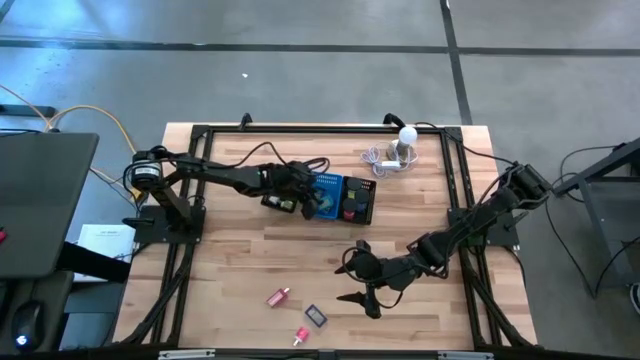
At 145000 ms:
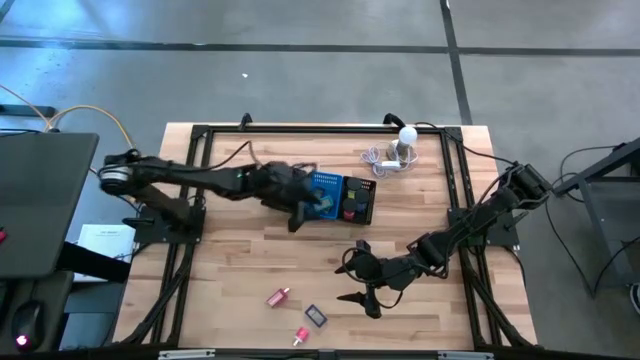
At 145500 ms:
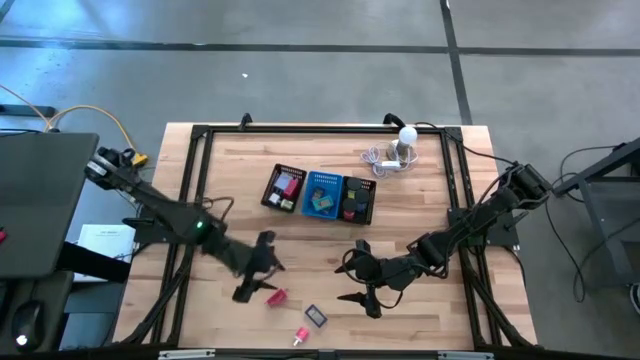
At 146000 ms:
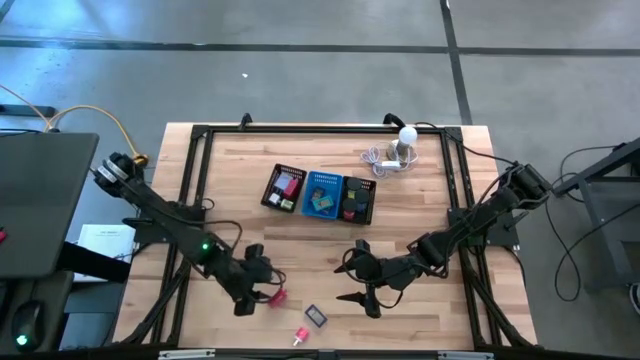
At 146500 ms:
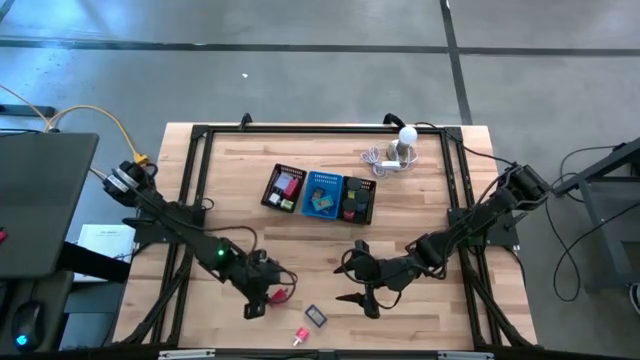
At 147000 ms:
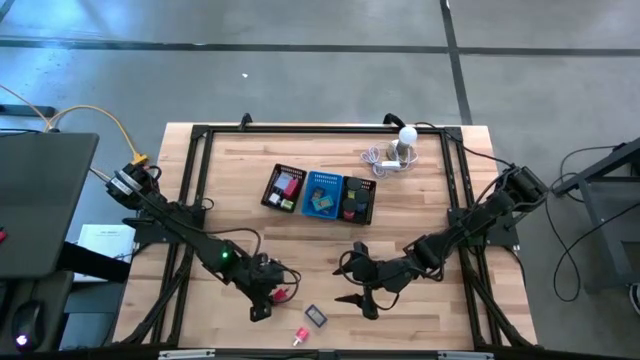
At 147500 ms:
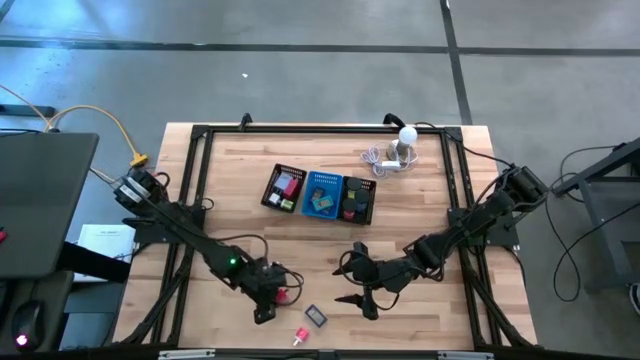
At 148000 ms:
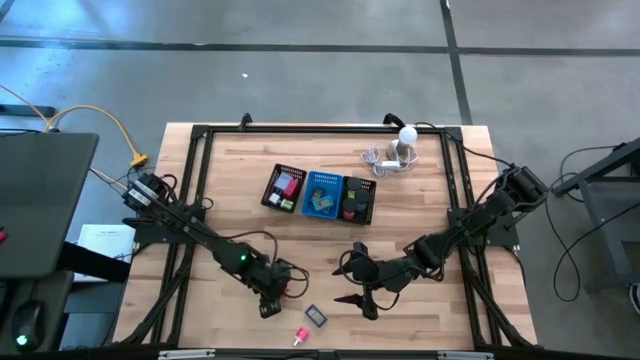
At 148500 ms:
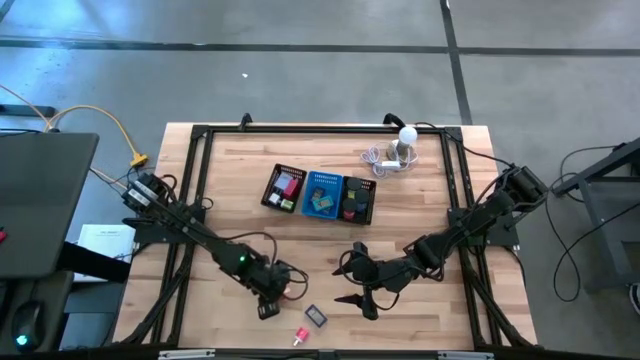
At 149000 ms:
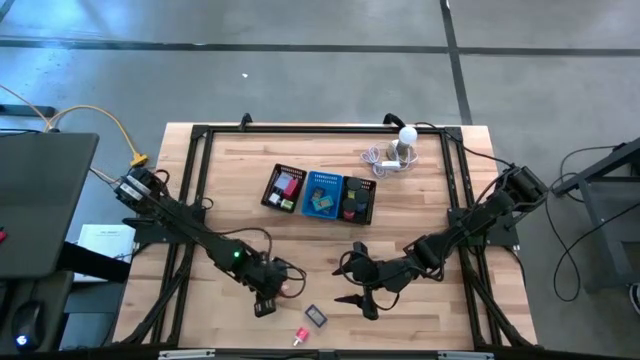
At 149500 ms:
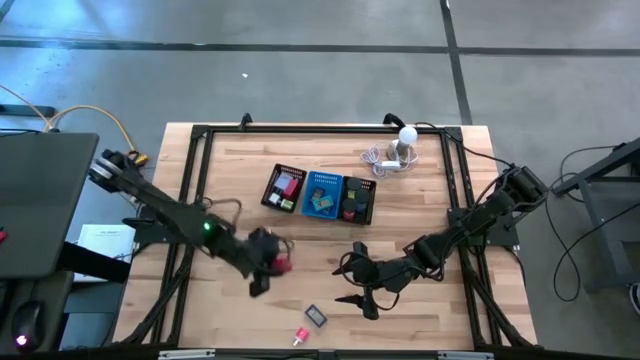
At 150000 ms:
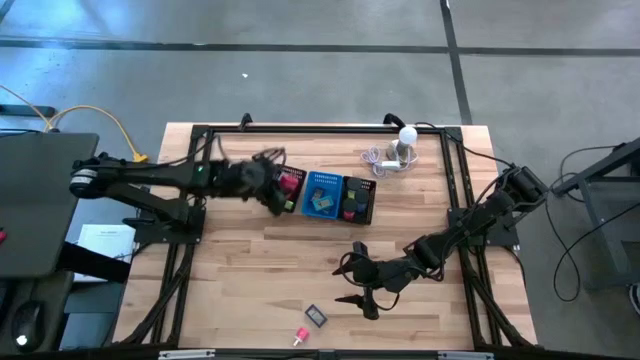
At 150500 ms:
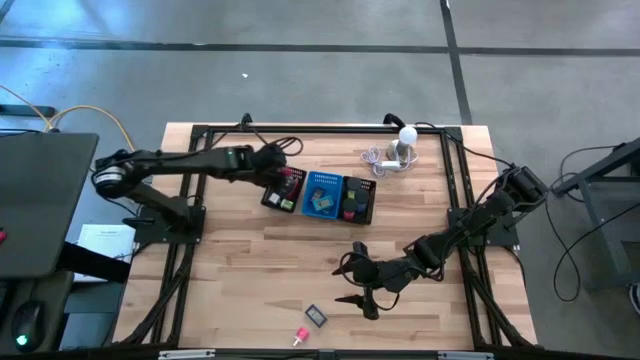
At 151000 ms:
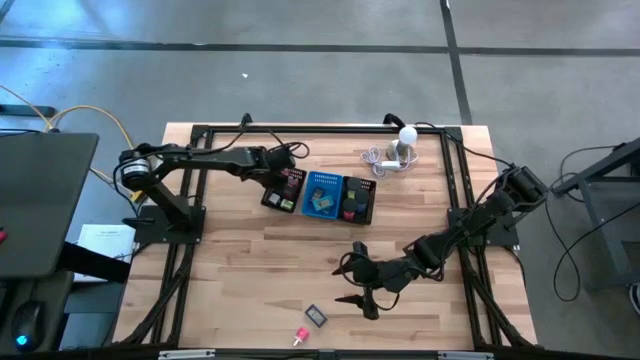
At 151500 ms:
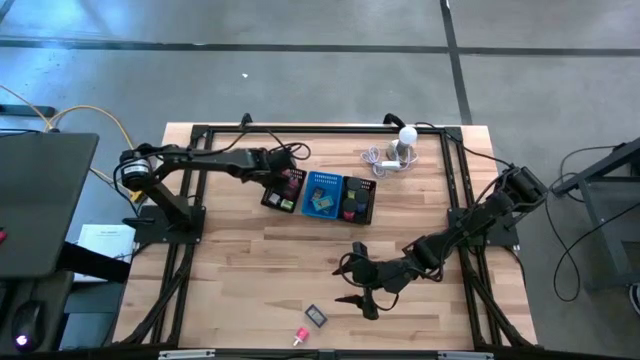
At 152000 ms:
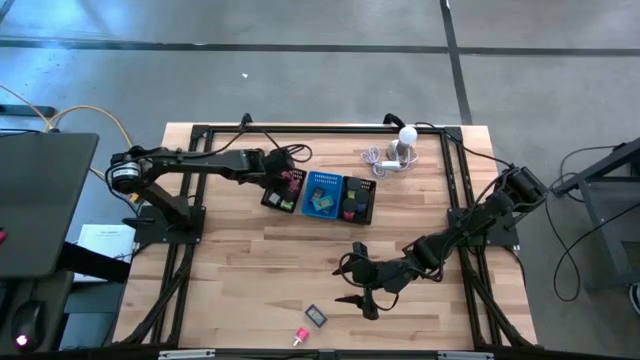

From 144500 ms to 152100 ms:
Task: Pick & Place Office items
Put the red charger adapter into the left black bin

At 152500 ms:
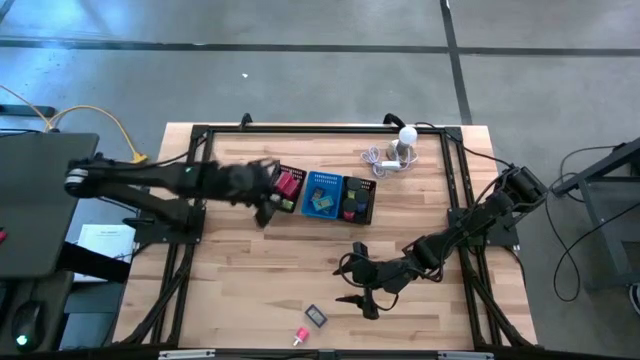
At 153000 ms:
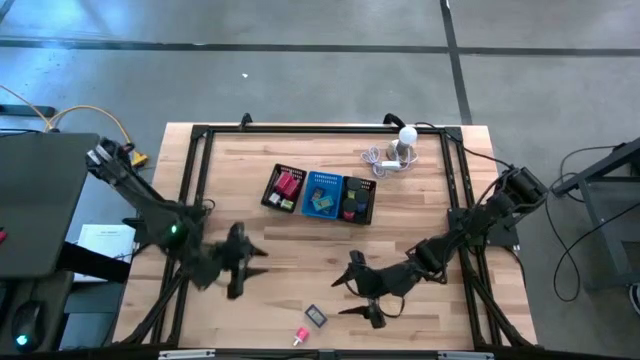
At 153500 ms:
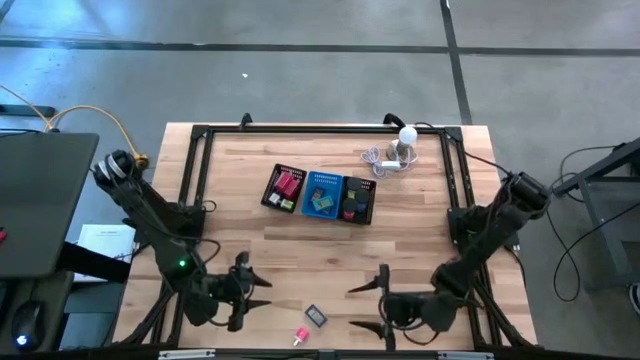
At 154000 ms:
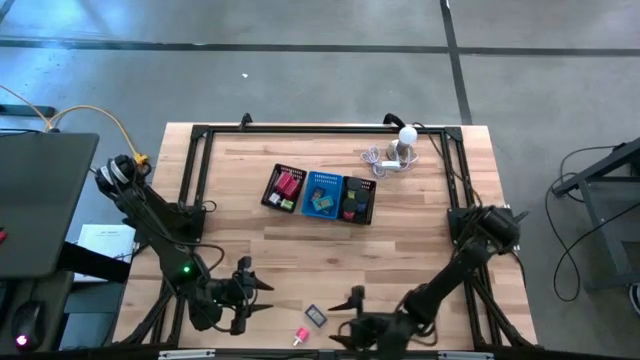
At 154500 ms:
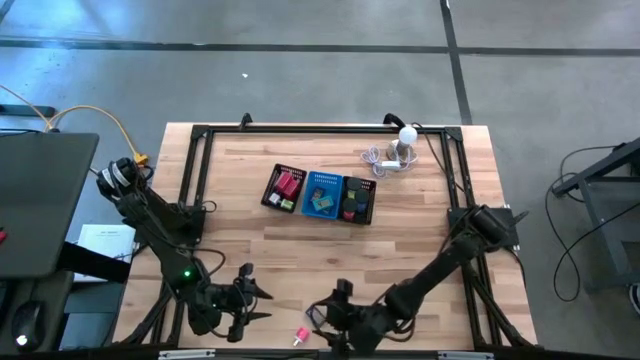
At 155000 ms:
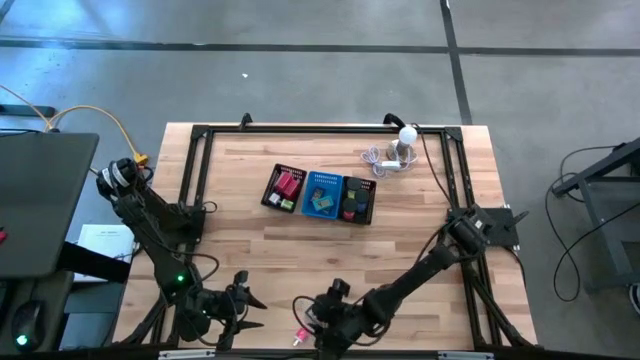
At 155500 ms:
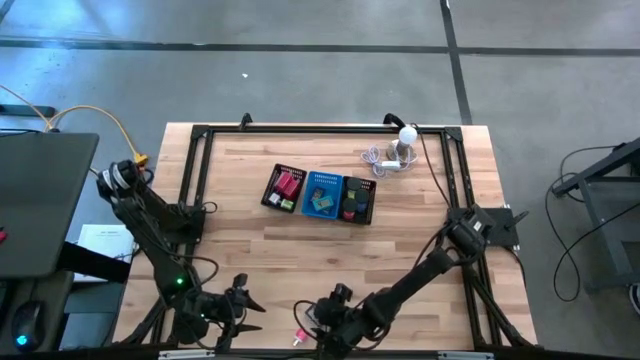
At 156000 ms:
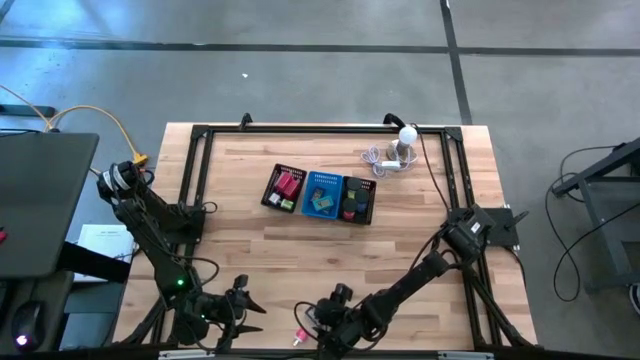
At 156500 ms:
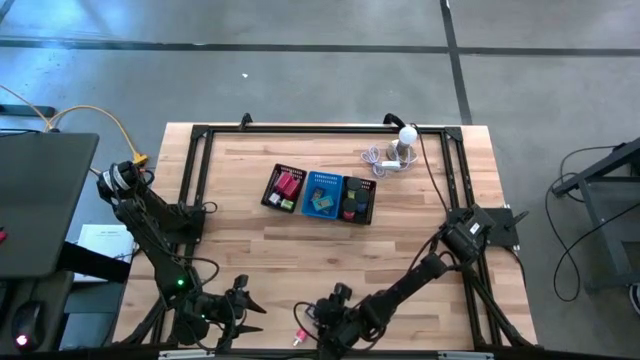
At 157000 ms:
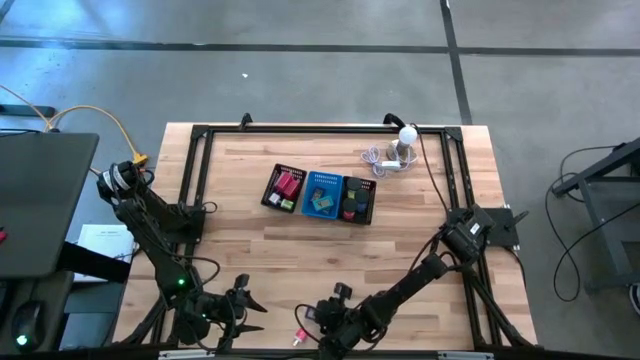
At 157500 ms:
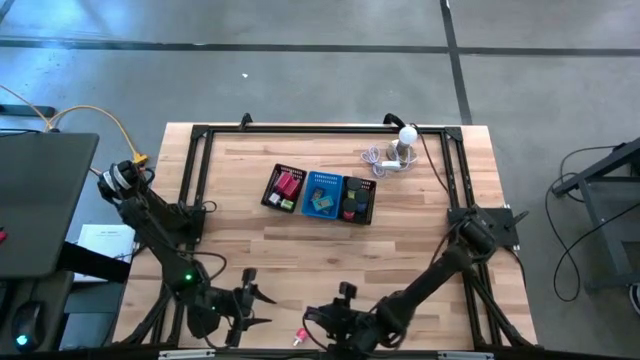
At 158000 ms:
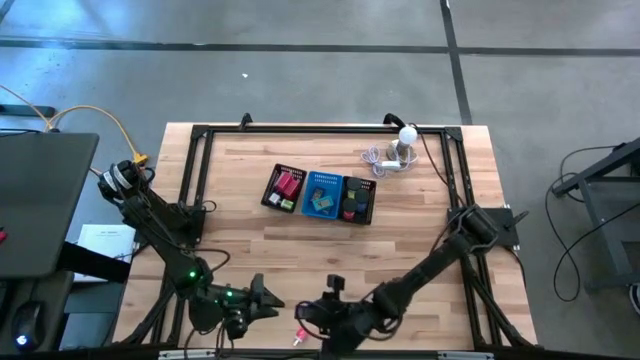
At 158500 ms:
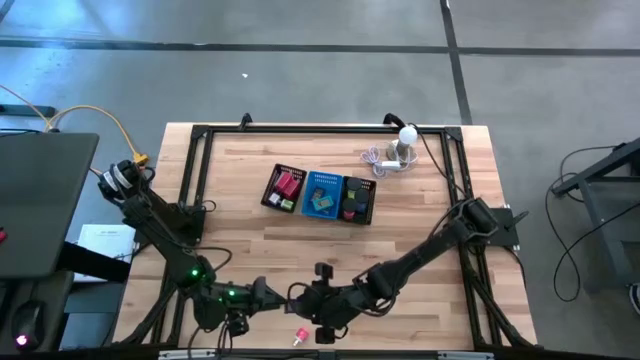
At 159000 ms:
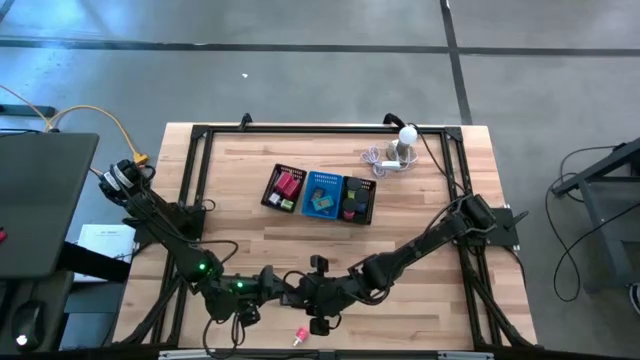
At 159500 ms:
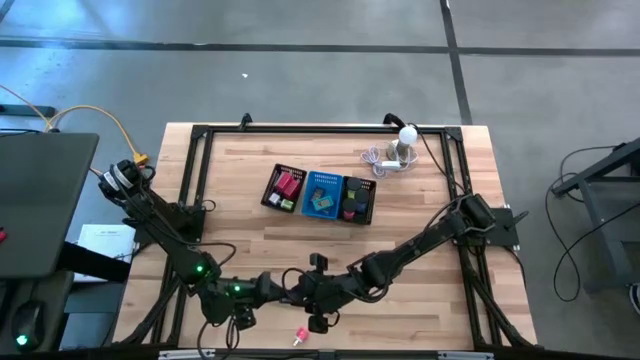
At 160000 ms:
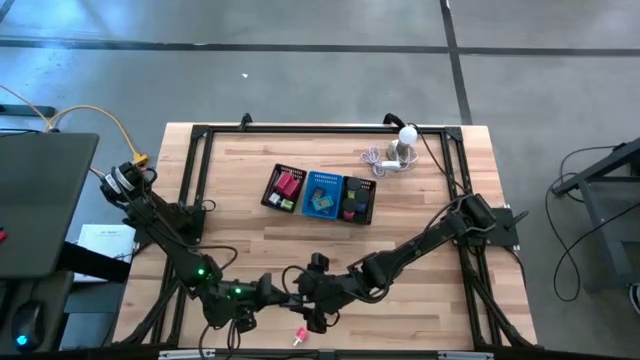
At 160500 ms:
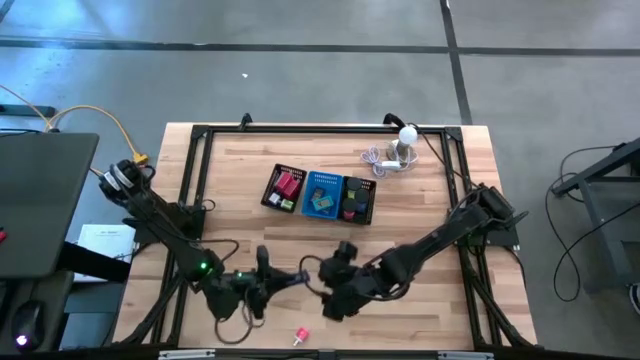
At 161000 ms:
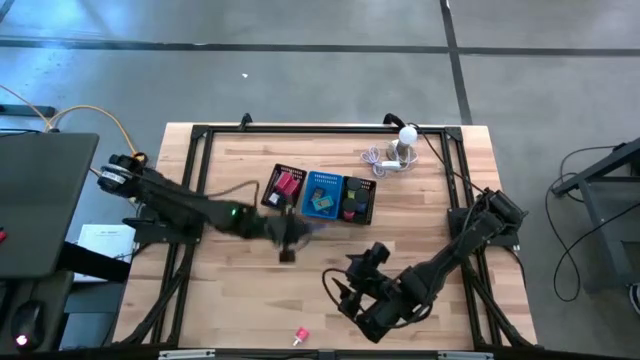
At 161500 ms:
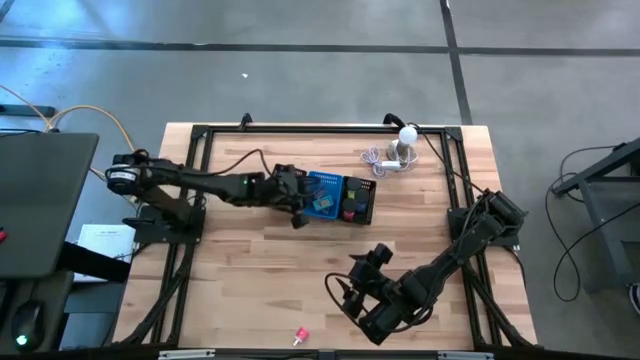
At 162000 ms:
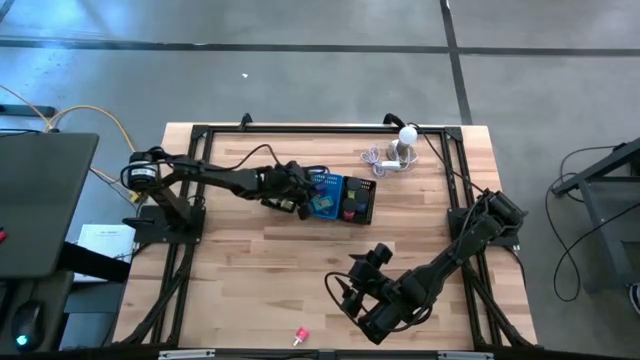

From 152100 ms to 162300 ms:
Put the purple digital clock into the blue bin

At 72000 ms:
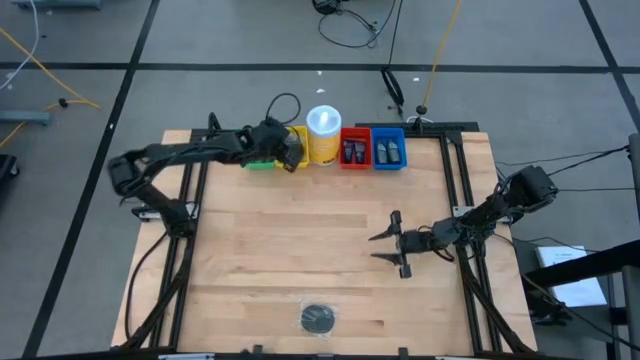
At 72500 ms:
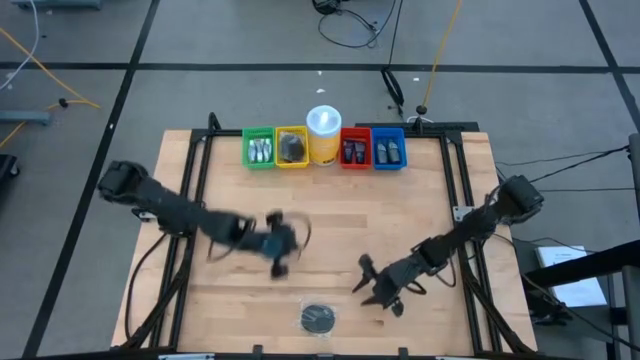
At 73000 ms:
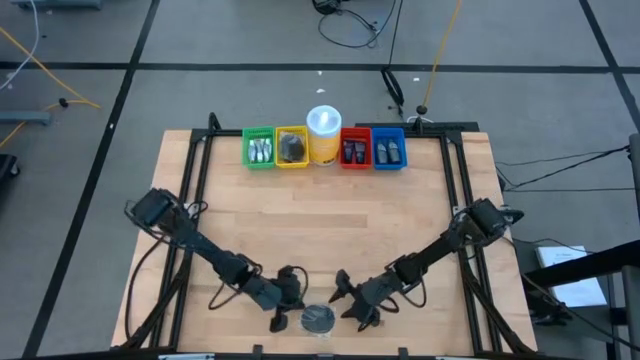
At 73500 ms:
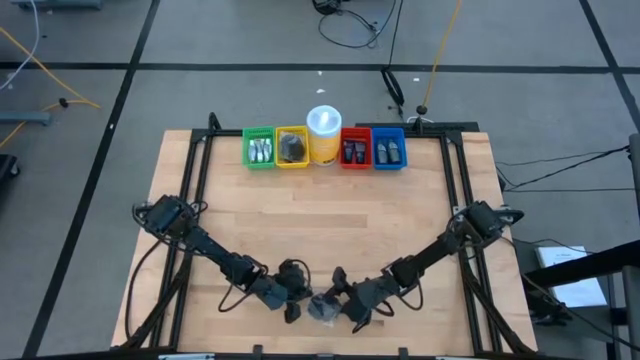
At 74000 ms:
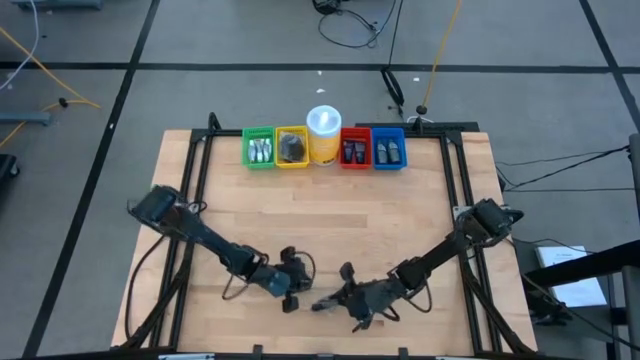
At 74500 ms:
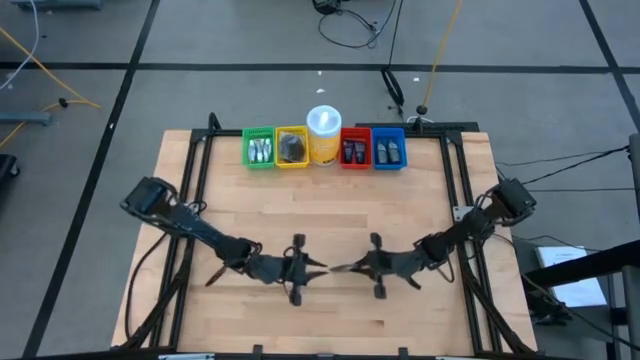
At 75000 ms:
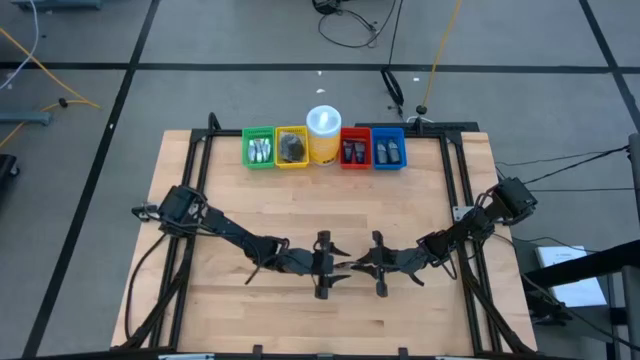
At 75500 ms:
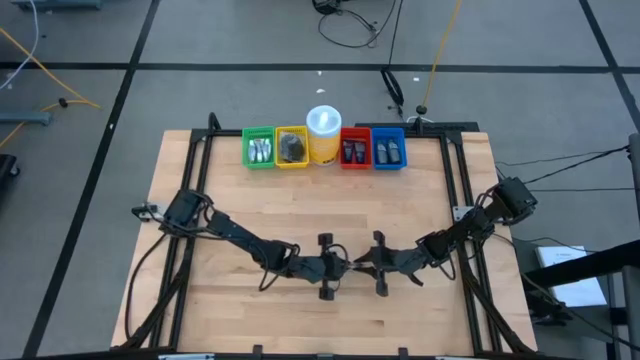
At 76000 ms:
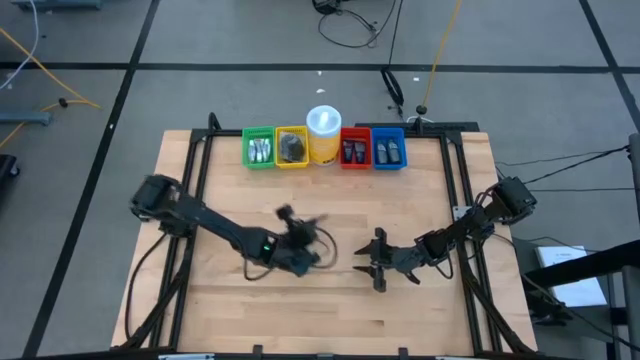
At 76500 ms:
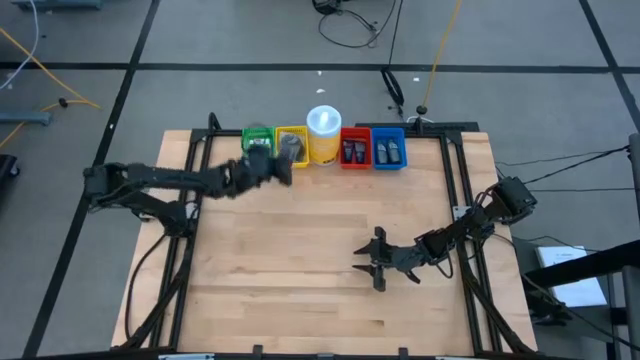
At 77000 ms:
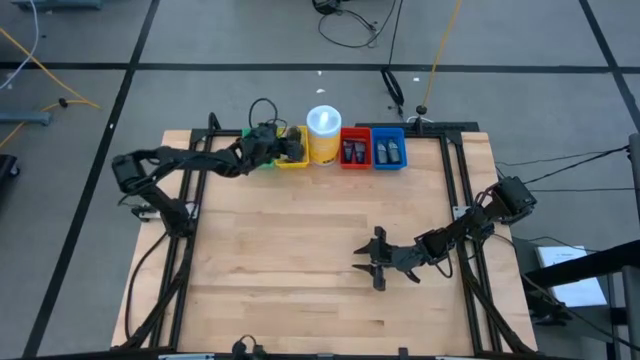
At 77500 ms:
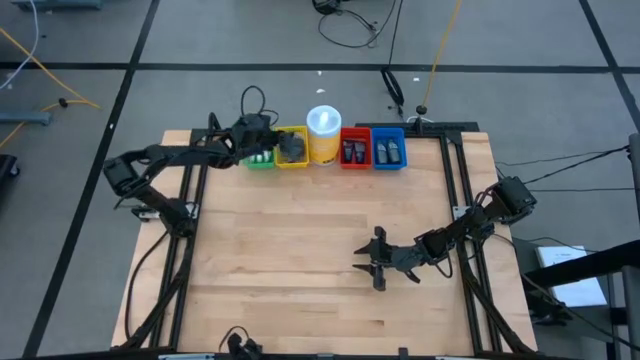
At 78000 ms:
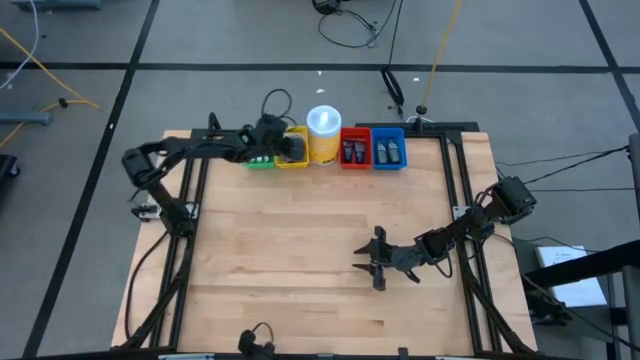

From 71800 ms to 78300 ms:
Task: Pick & Place Travel size toiletries
Put the black hairbrush into the yellow basket
